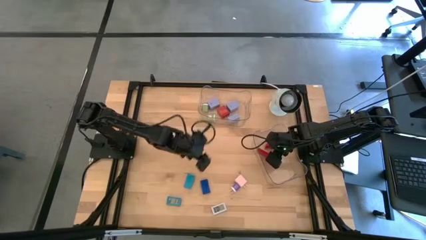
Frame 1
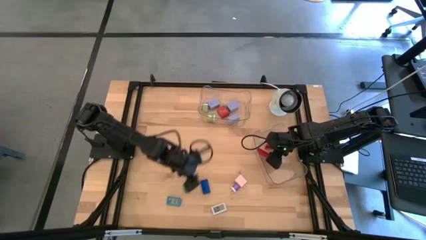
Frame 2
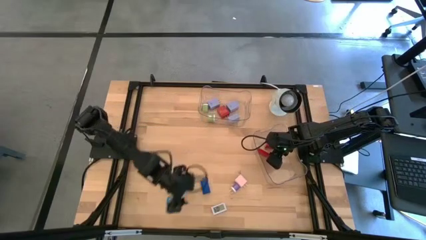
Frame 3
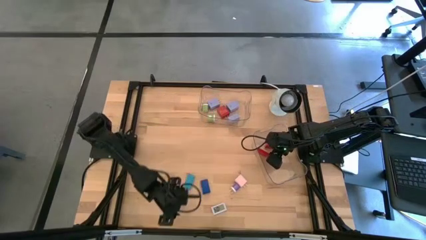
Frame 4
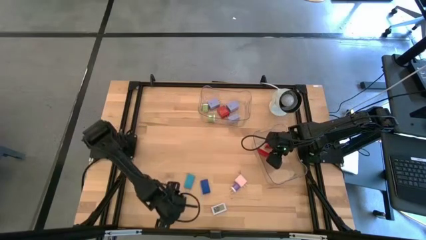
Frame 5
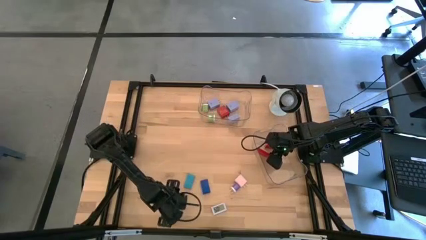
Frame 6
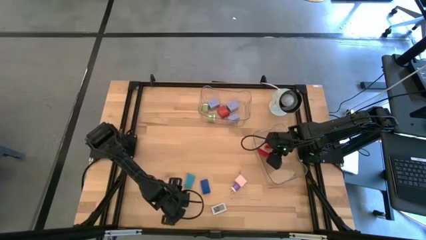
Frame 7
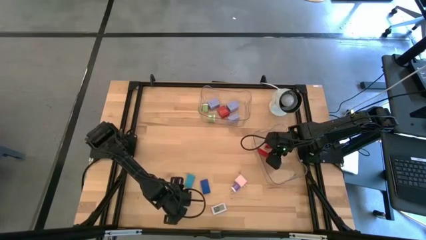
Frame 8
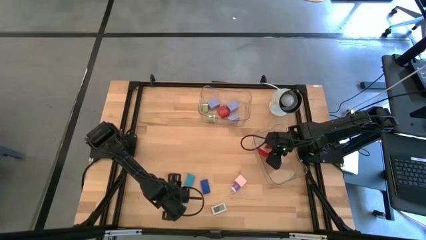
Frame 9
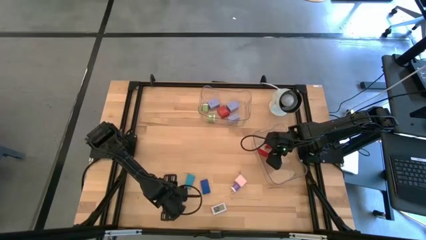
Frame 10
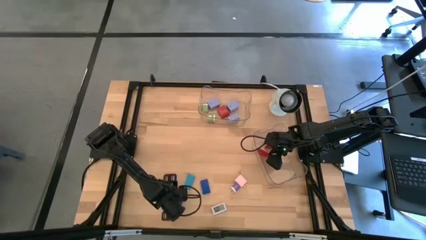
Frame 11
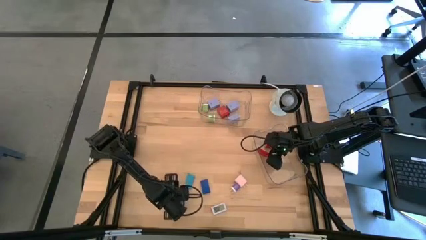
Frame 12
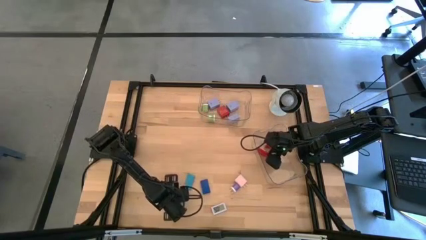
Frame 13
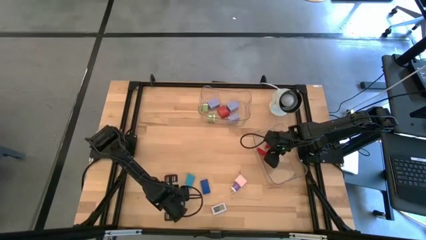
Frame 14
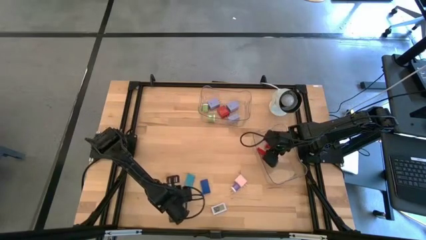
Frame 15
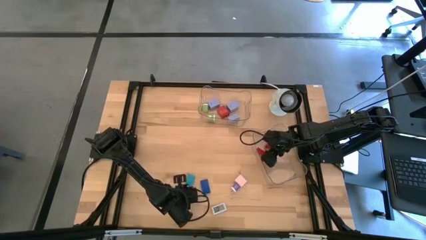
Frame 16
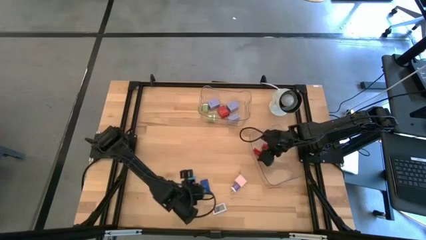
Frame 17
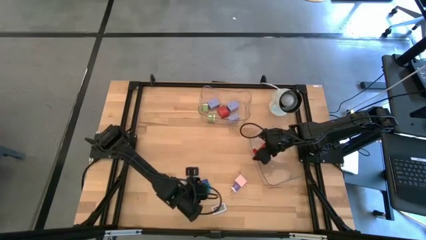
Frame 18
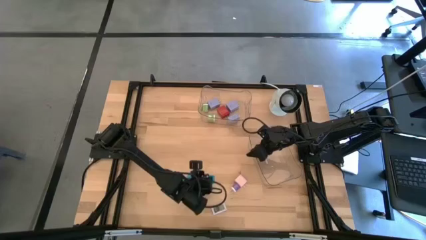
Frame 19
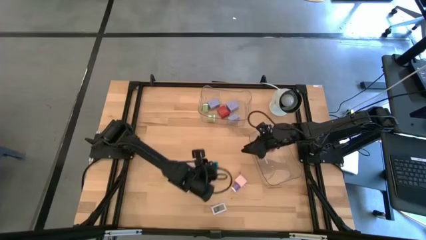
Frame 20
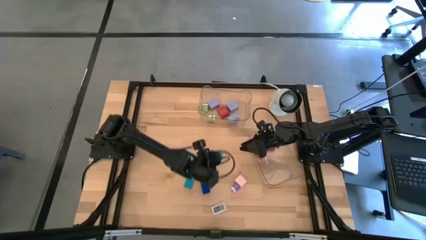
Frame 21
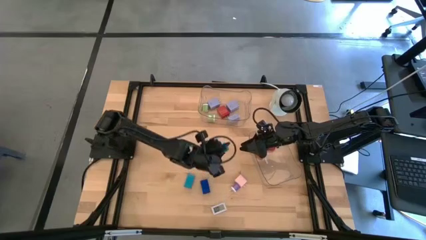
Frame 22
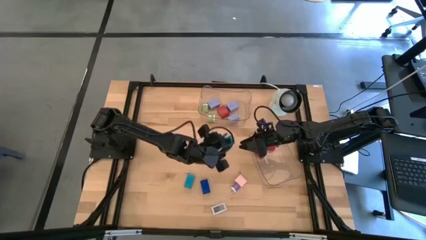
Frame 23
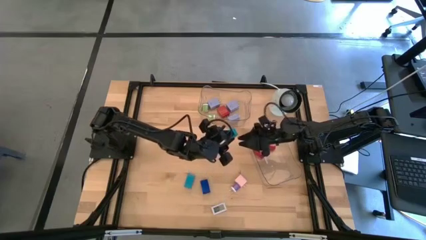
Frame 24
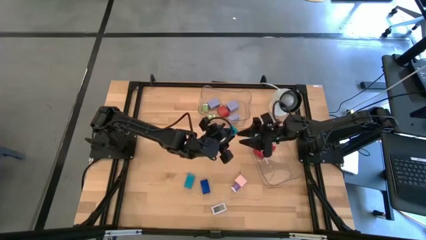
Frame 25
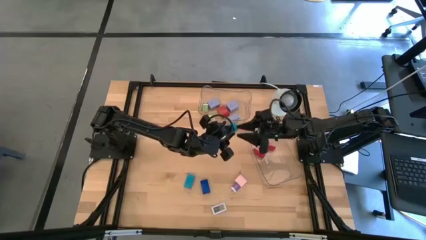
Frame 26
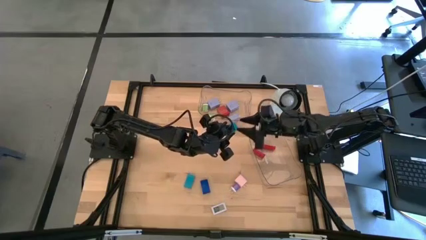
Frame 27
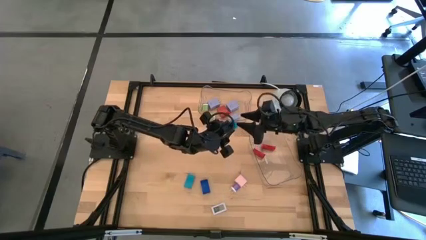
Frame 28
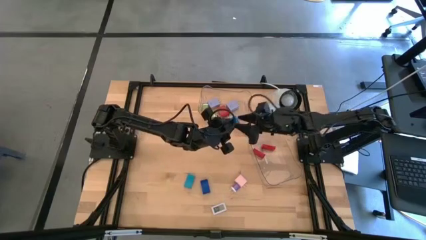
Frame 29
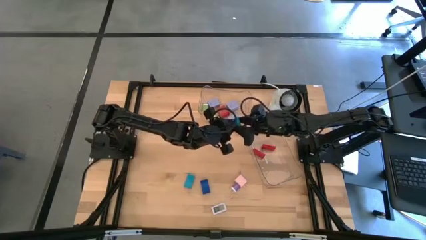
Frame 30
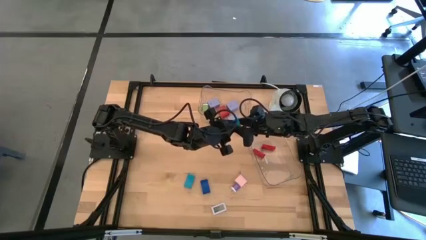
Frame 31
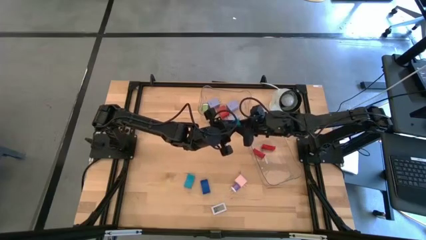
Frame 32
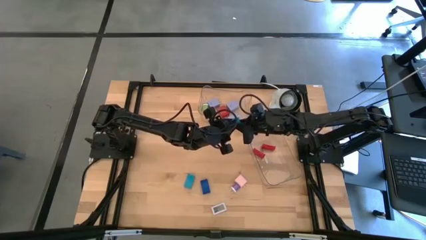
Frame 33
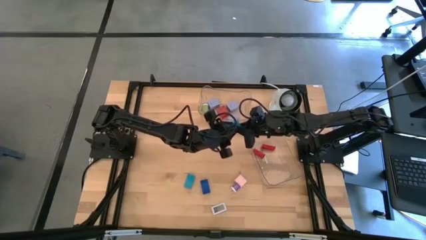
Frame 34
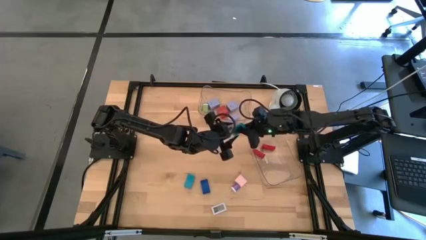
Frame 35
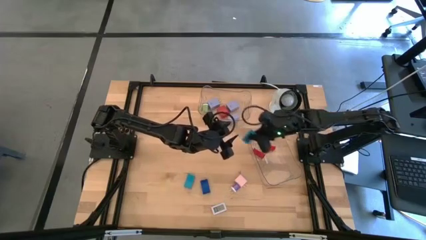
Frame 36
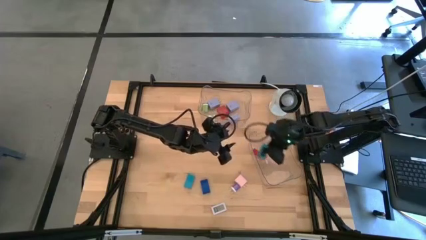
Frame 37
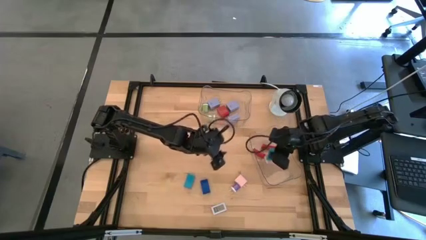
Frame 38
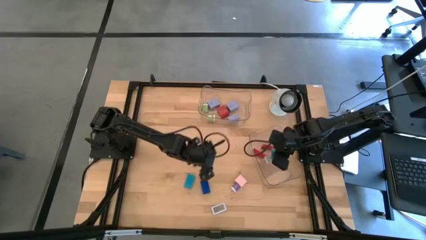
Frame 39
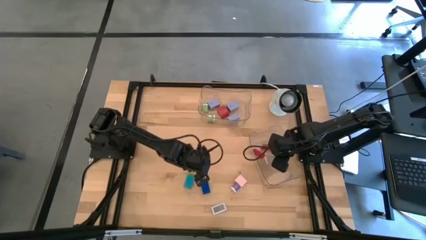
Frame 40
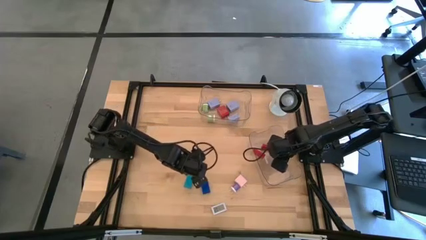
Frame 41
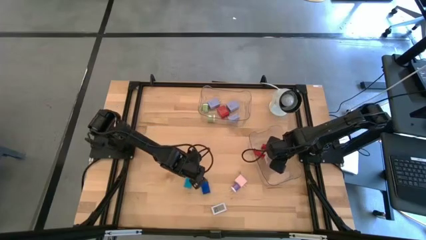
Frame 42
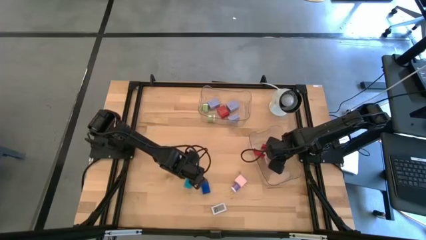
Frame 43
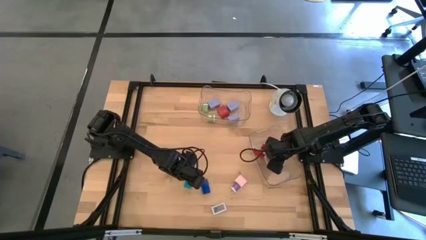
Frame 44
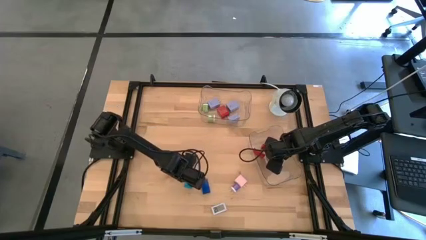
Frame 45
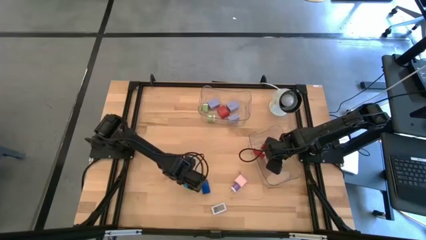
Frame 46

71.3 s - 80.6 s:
Task: Pick & Place Office items
Put the bottom light blue digital clock into the bottom transparent bin

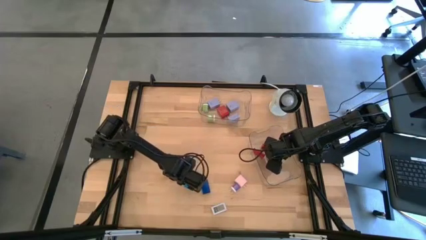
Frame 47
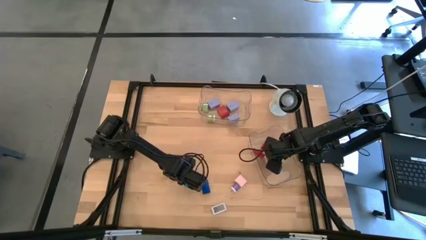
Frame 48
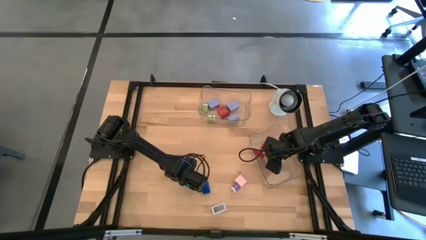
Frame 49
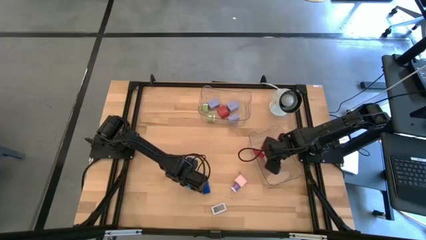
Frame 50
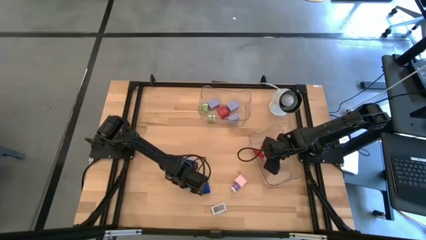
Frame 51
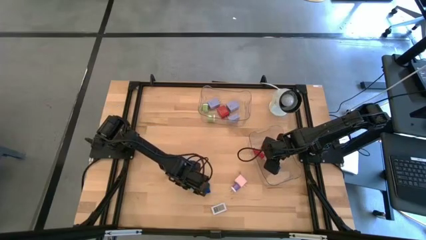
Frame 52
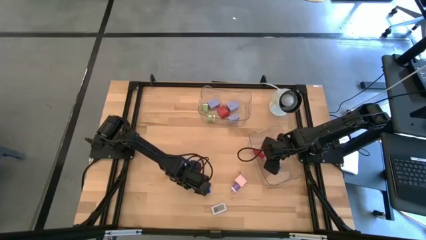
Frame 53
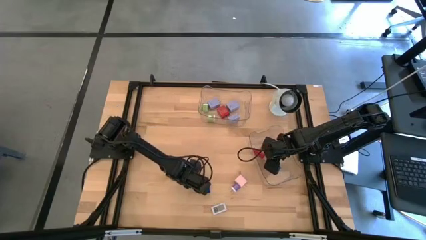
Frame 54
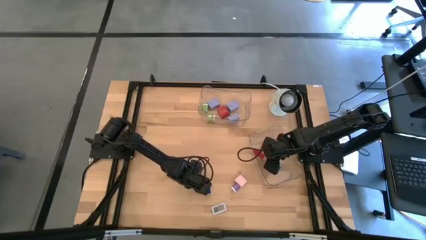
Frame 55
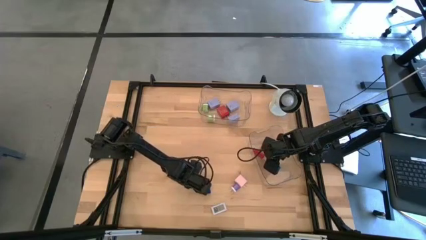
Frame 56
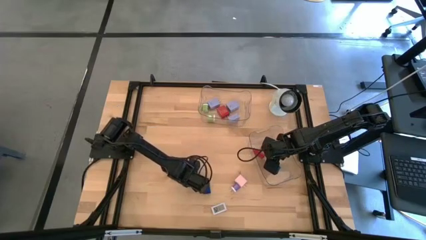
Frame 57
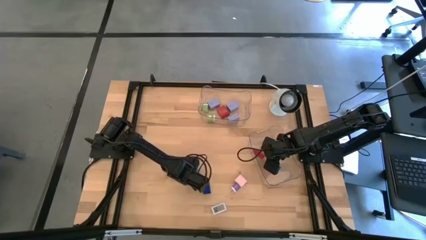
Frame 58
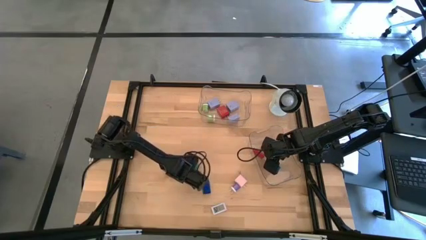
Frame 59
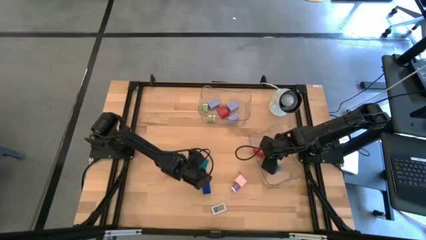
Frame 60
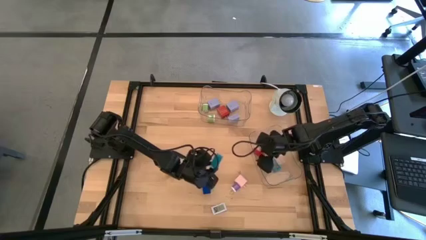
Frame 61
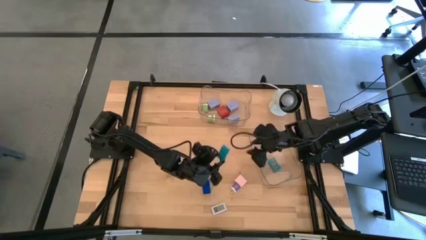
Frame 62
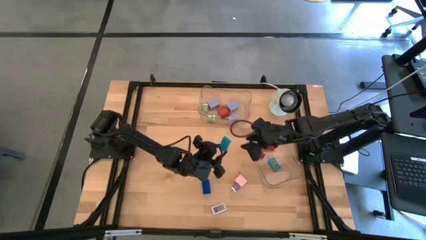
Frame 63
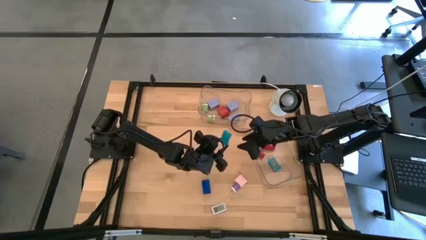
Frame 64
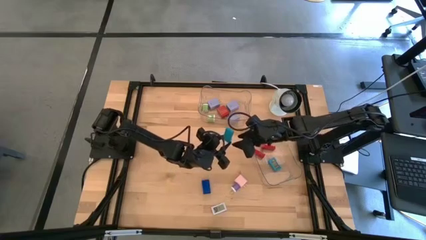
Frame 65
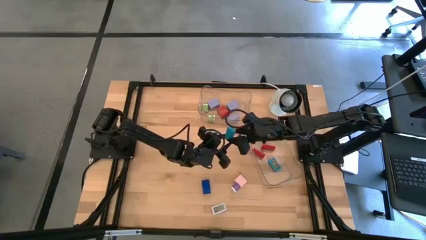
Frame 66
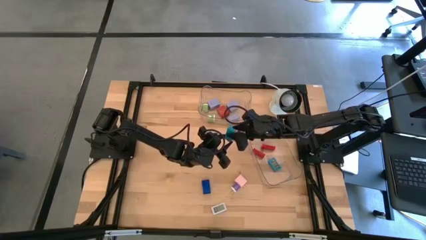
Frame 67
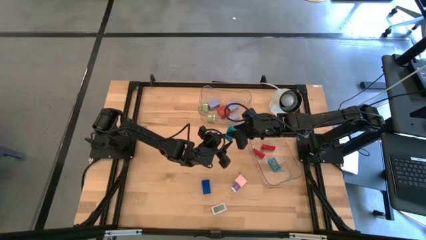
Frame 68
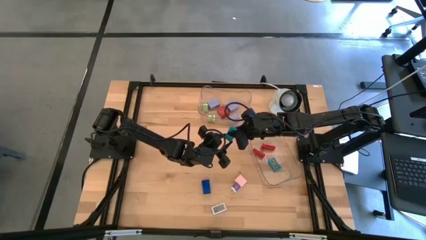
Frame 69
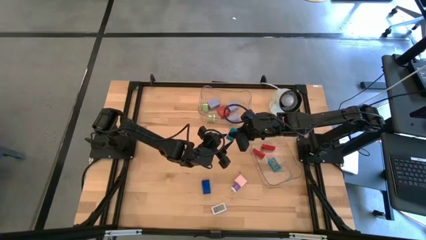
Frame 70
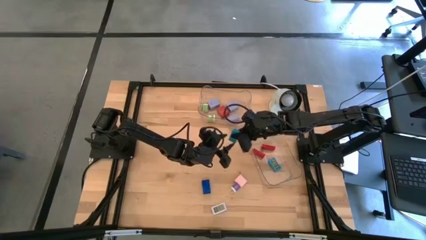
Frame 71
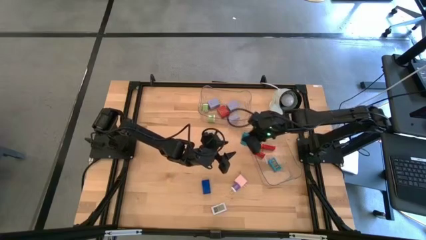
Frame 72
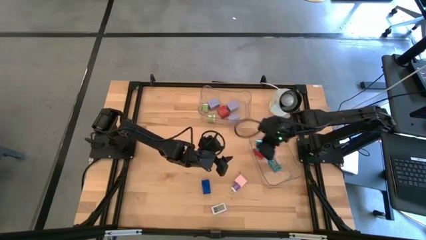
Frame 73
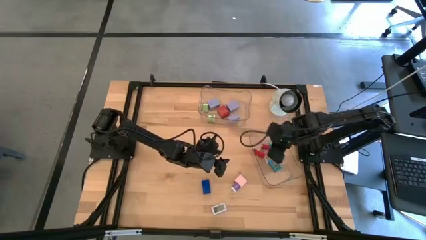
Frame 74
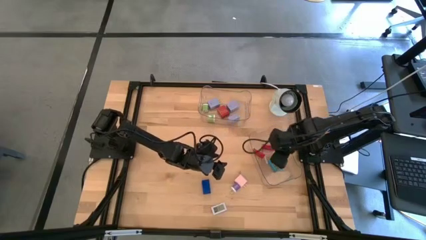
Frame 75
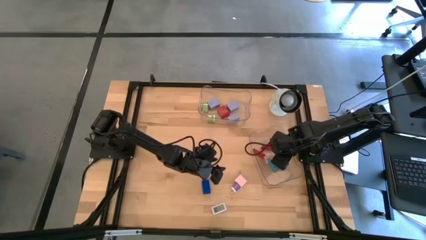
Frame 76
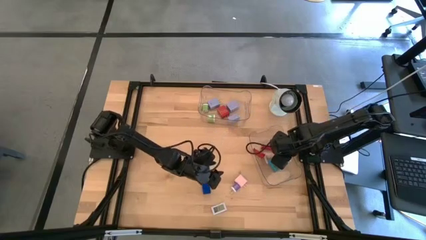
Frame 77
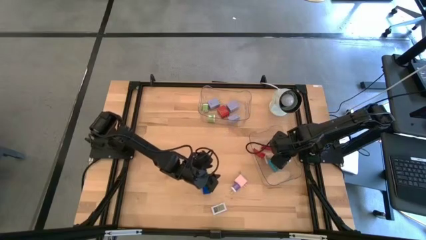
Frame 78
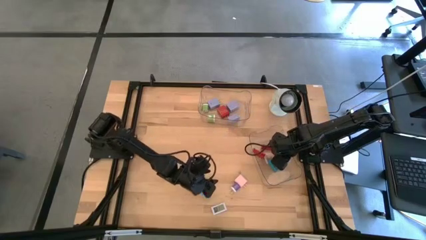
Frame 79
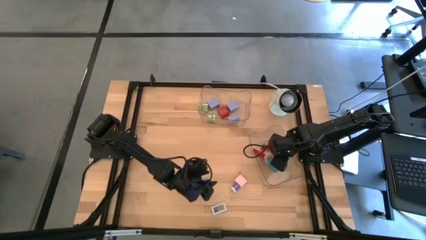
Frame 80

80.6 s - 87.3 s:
Put the light blue digital clock into the bottom transparent bin
